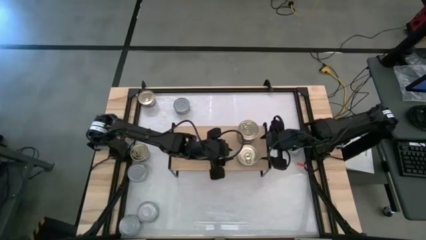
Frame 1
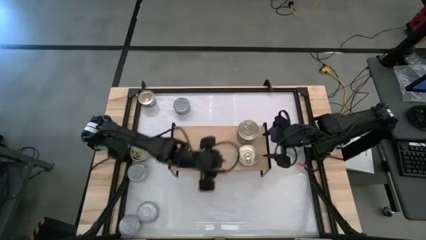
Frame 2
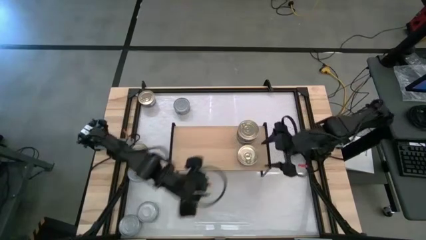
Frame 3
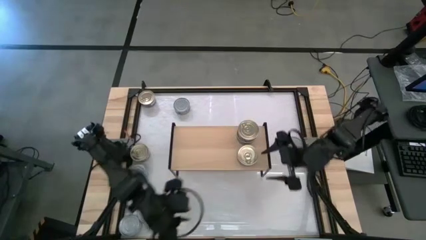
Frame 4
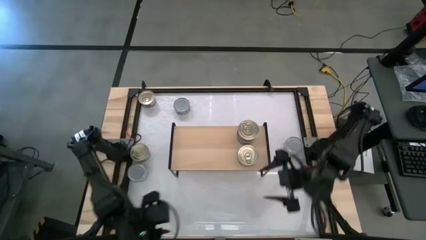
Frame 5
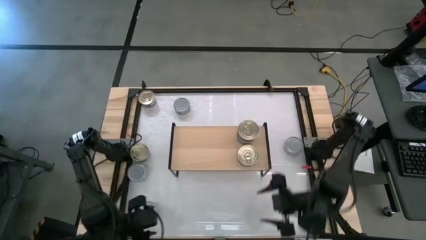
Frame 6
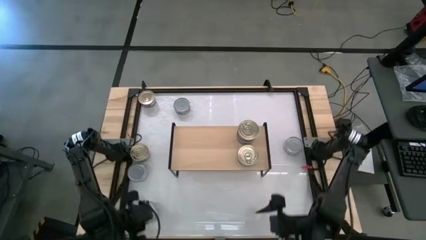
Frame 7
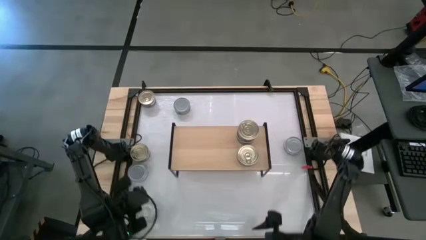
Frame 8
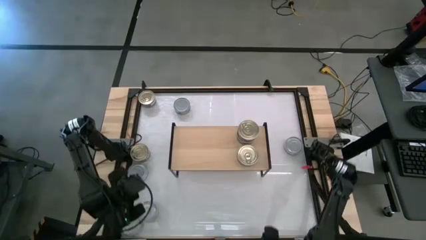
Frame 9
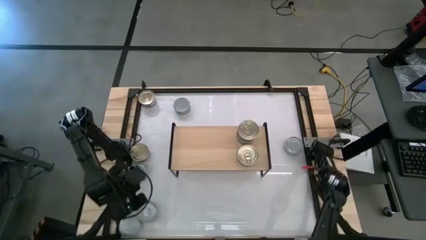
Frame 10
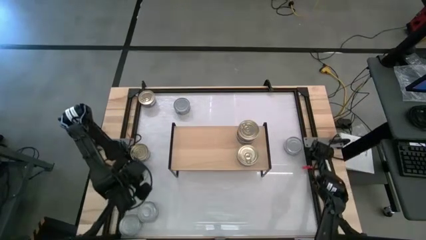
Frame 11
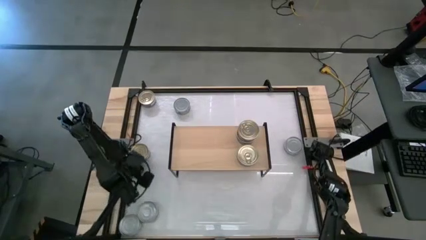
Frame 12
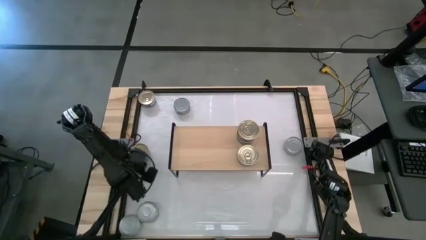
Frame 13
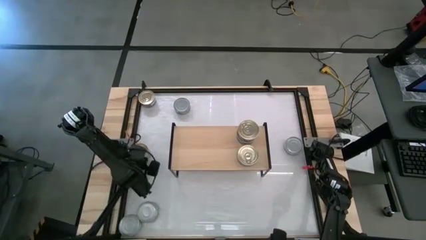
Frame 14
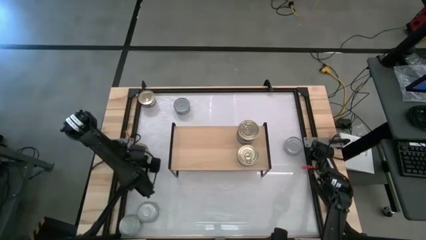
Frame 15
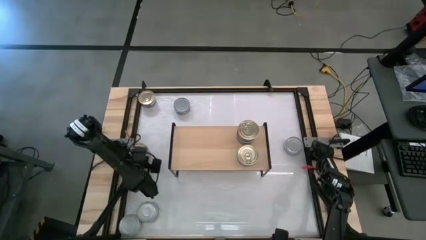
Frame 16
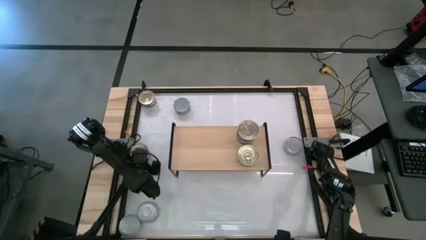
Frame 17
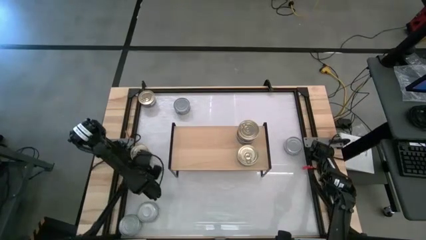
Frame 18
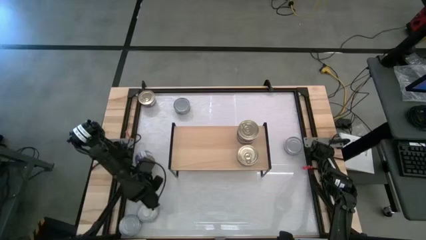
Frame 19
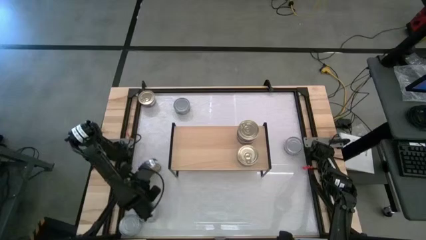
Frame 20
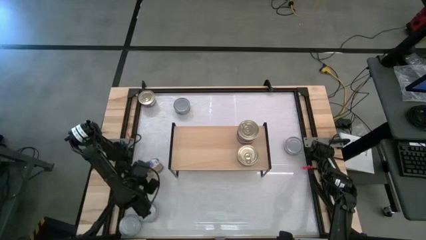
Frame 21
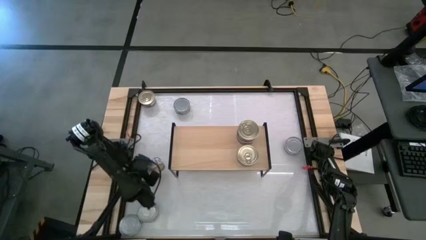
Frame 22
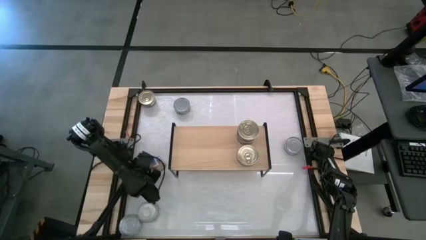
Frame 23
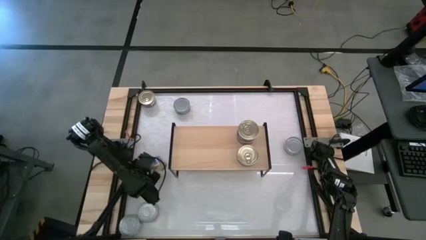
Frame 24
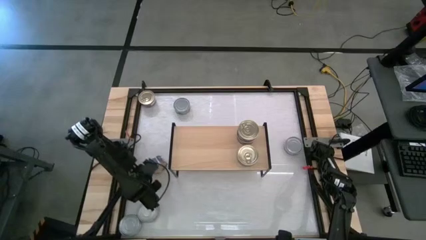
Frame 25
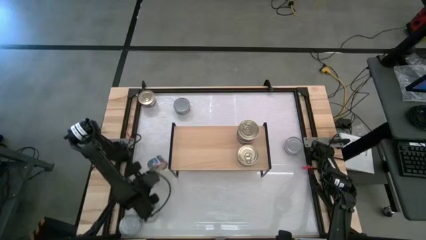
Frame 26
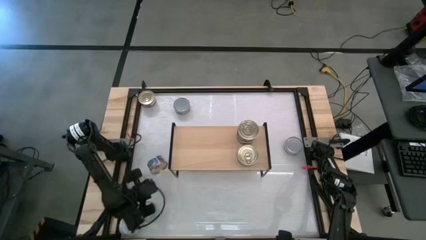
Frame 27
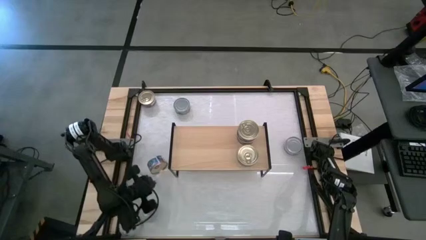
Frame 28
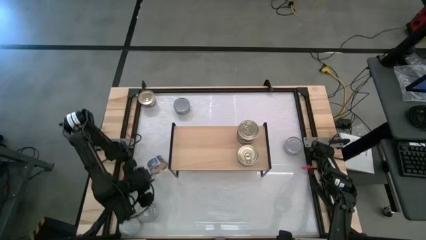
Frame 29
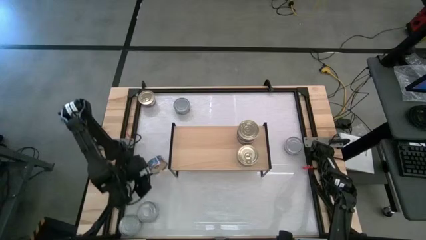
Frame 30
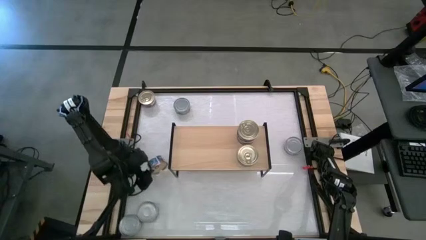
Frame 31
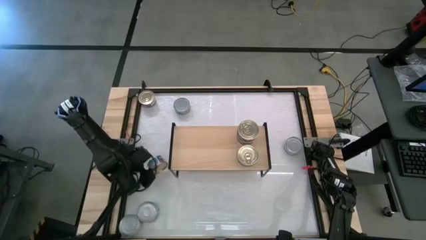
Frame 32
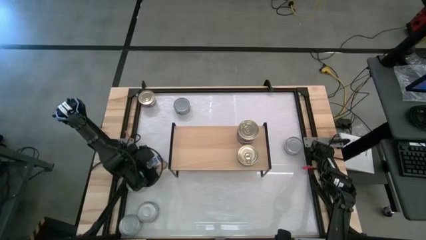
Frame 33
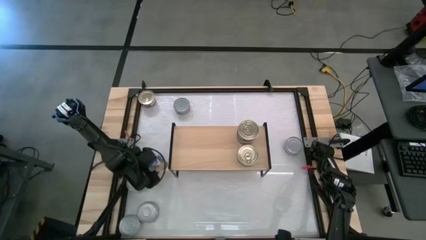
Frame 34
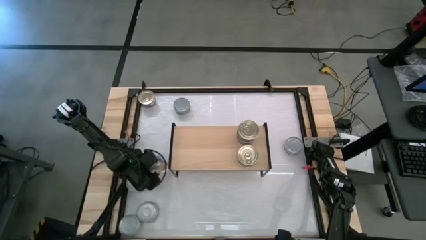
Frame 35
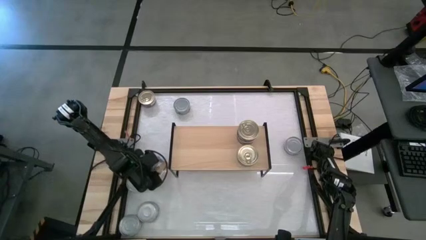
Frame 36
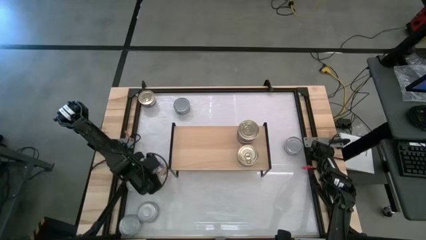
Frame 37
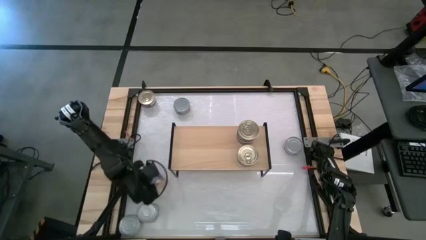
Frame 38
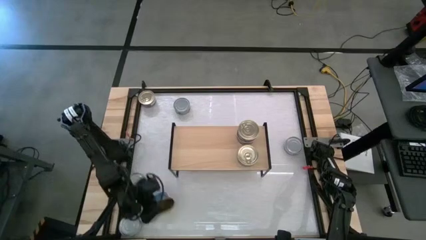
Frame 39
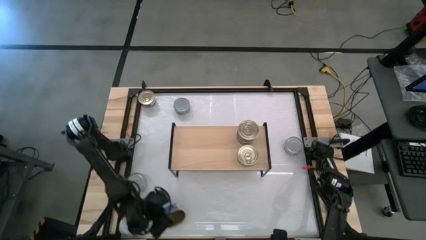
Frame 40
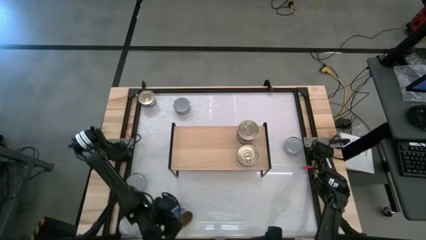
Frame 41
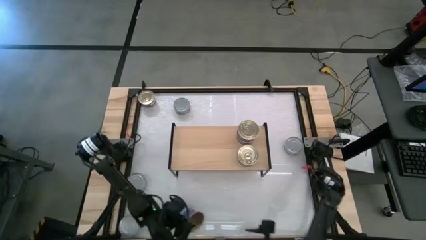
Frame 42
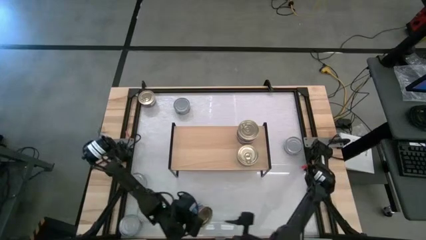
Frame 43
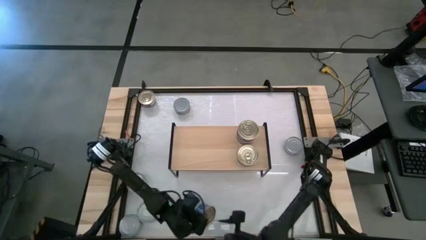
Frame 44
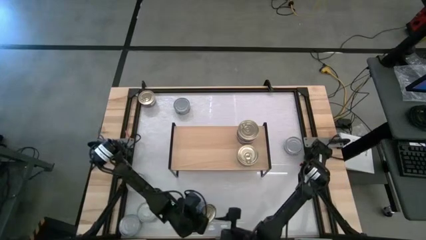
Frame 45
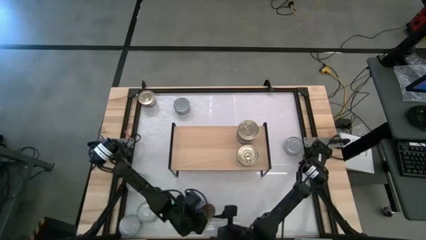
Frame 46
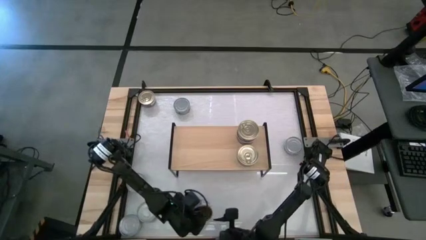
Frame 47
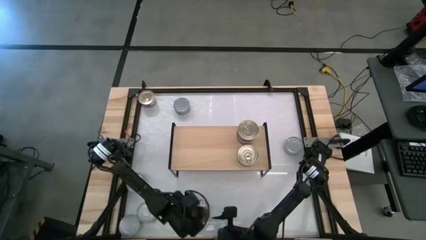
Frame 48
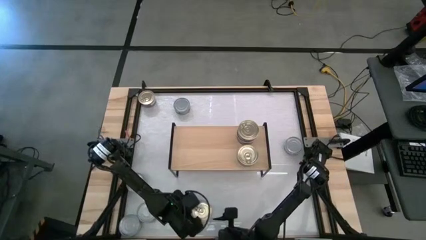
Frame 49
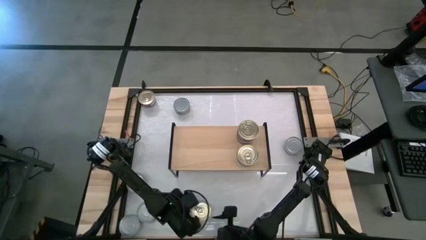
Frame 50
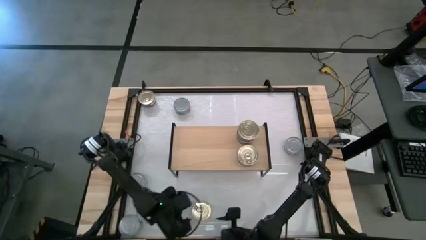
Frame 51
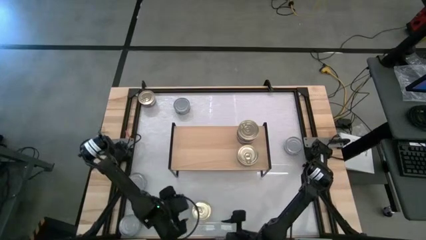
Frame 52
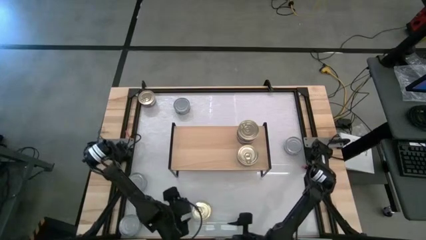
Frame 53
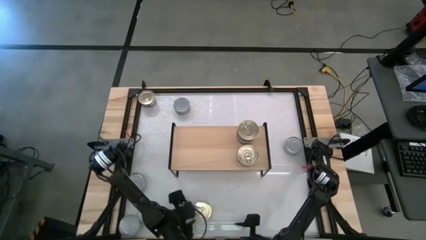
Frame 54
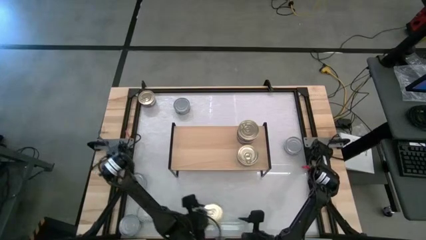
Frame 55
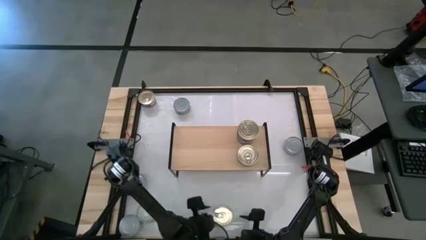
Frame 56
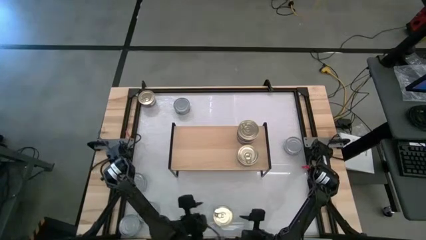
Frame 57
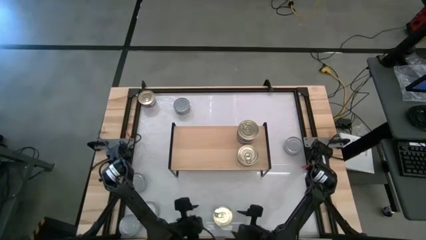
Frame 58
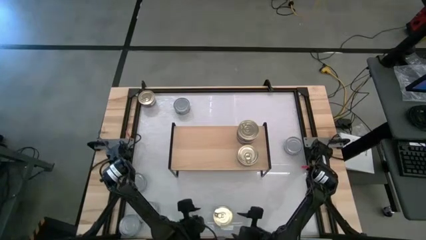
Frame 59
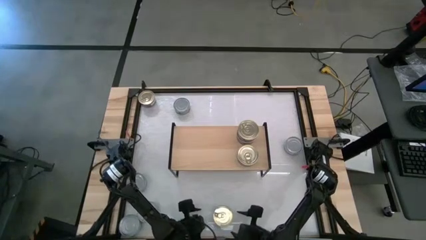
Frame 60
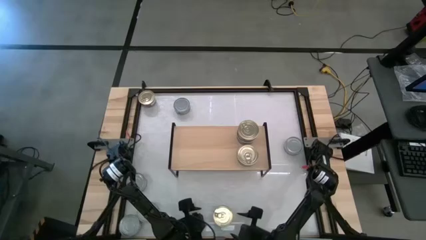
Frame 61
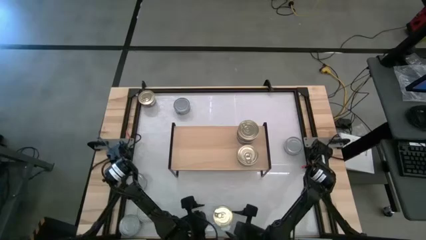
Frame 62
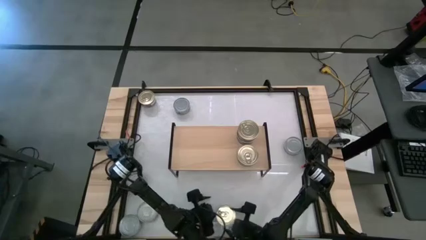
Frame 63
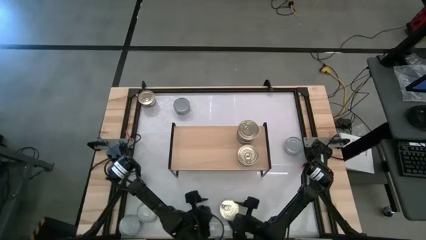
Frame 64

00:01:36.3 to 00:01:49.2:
Task: Stack canned seafood by type on shelf
Stack the blue-pink tuna can on top of the other blue-pink tuna can on the shelf
